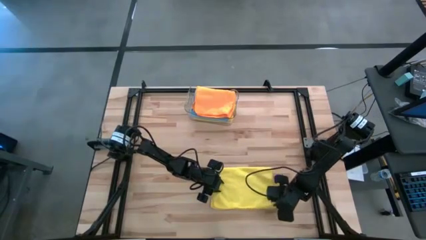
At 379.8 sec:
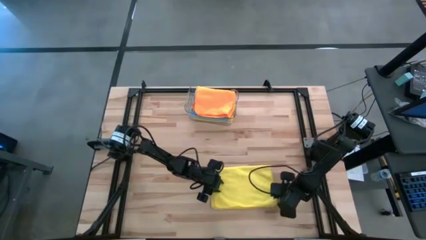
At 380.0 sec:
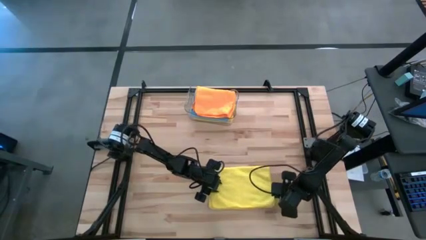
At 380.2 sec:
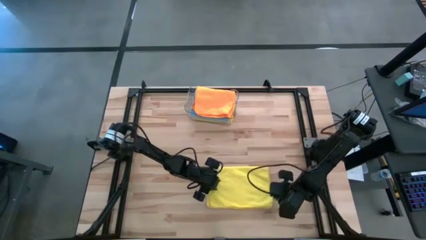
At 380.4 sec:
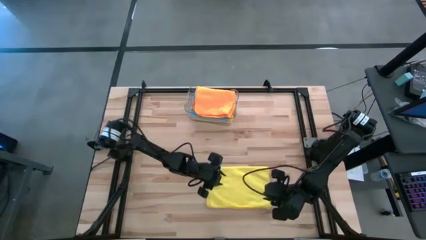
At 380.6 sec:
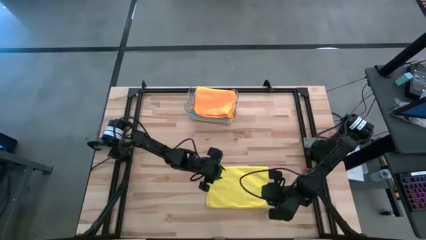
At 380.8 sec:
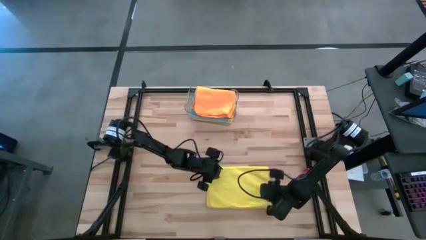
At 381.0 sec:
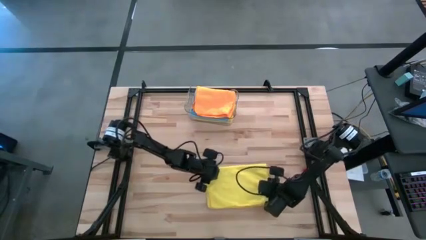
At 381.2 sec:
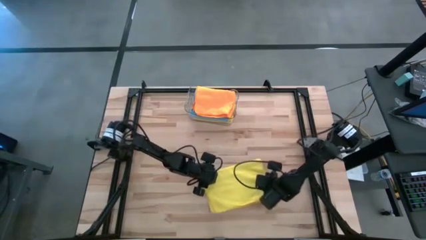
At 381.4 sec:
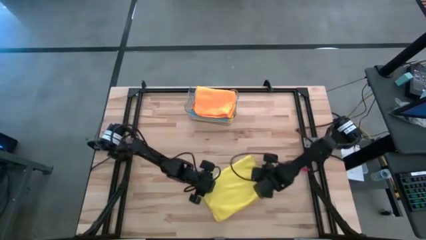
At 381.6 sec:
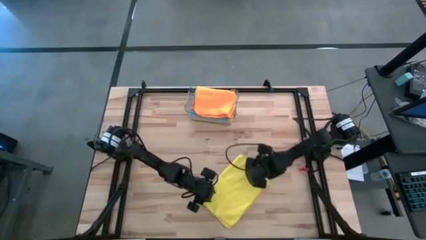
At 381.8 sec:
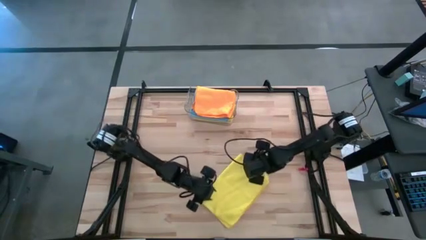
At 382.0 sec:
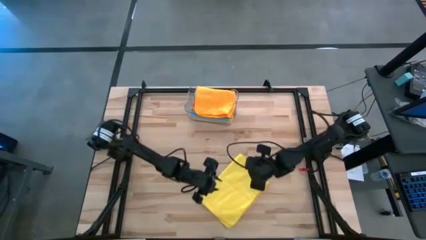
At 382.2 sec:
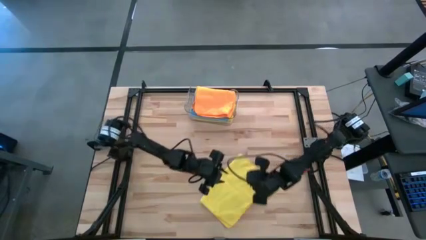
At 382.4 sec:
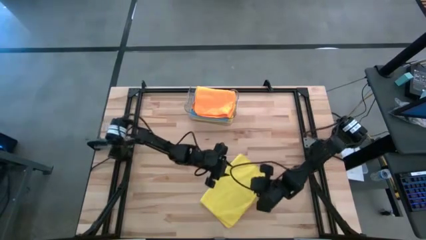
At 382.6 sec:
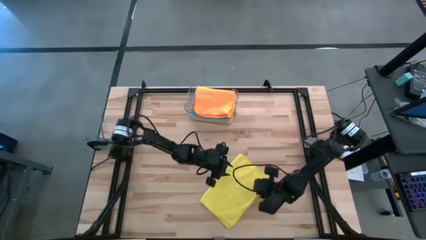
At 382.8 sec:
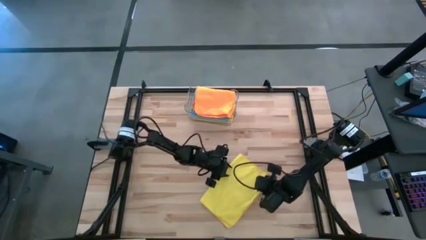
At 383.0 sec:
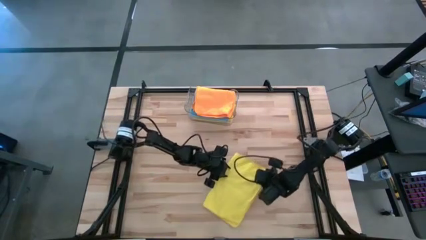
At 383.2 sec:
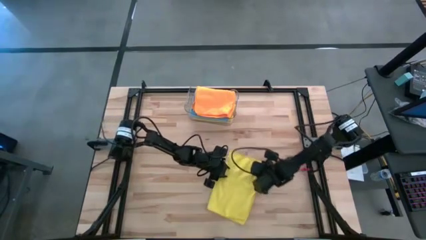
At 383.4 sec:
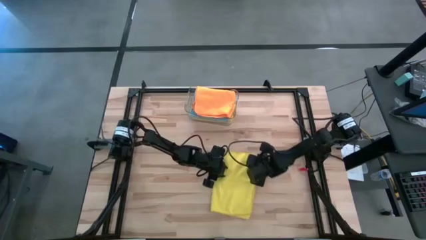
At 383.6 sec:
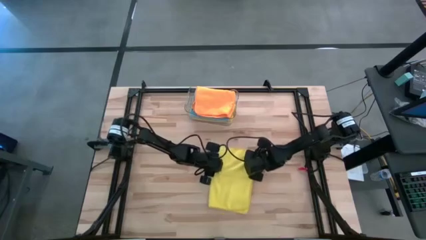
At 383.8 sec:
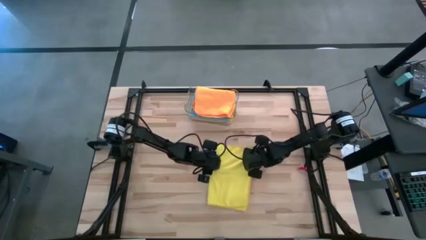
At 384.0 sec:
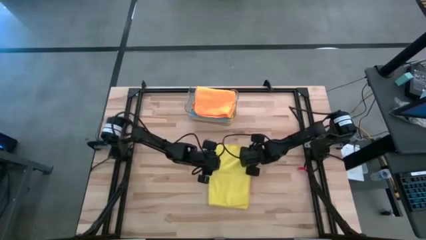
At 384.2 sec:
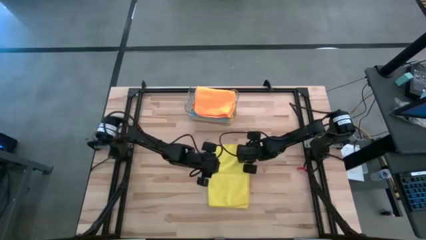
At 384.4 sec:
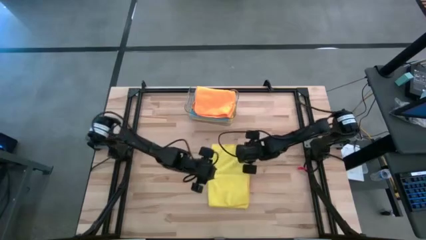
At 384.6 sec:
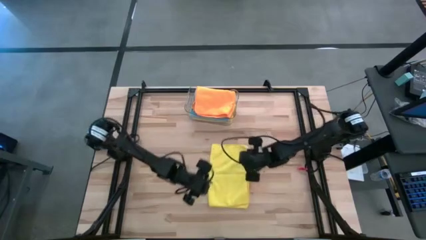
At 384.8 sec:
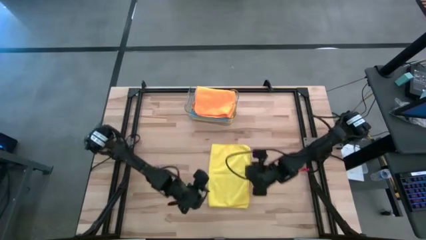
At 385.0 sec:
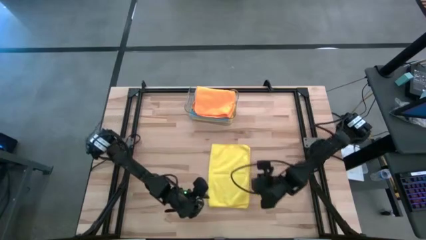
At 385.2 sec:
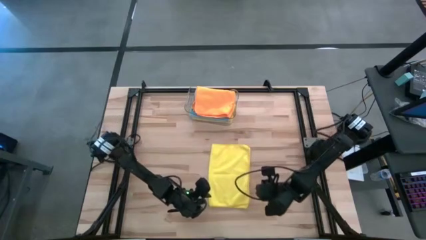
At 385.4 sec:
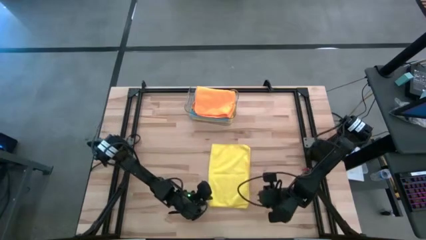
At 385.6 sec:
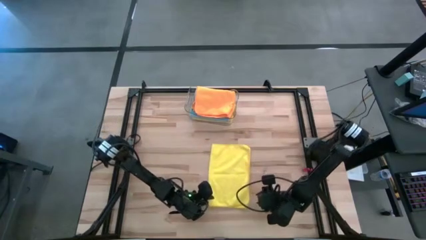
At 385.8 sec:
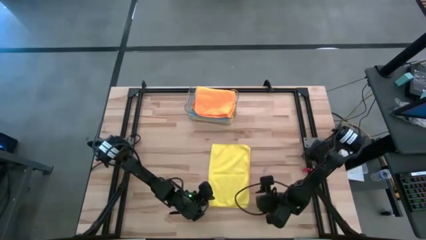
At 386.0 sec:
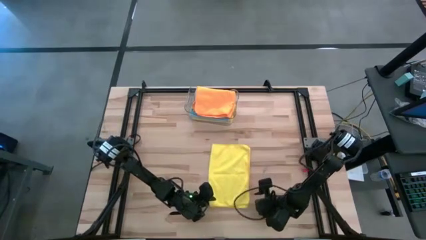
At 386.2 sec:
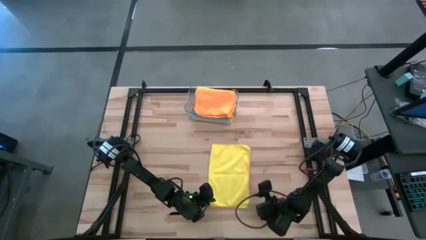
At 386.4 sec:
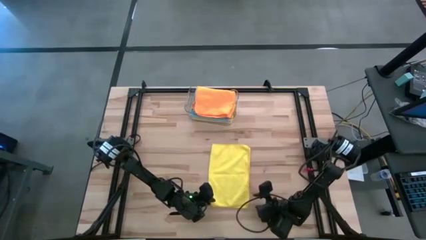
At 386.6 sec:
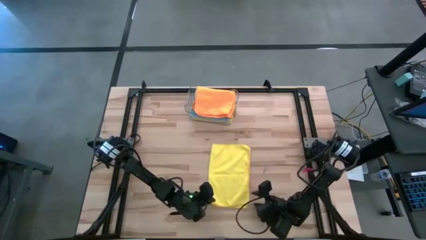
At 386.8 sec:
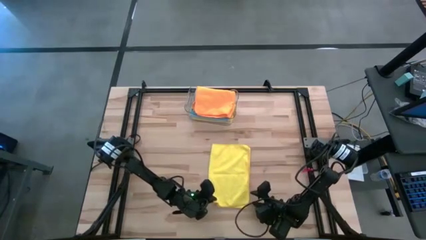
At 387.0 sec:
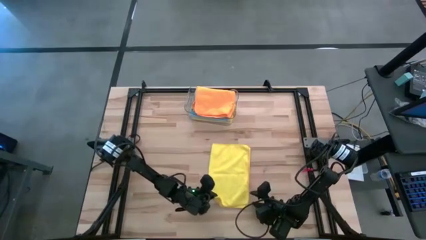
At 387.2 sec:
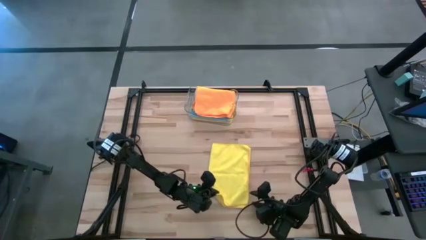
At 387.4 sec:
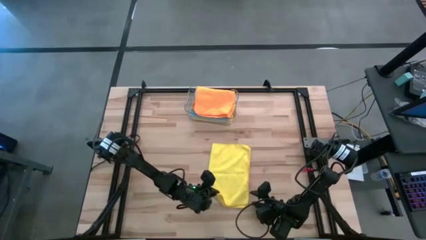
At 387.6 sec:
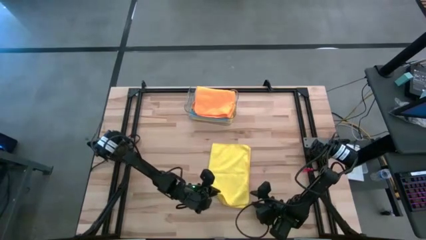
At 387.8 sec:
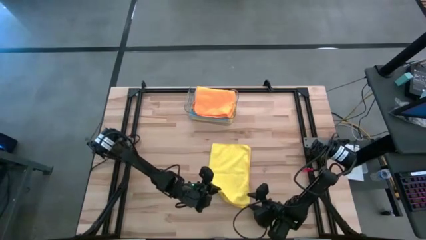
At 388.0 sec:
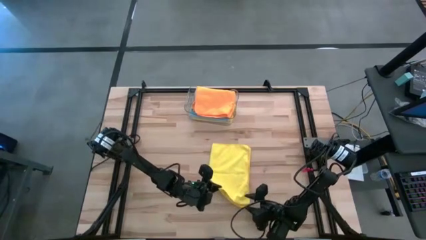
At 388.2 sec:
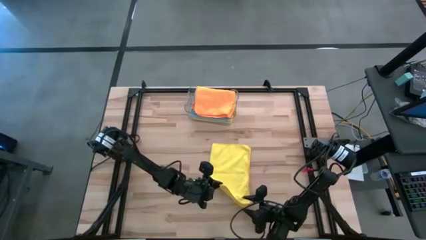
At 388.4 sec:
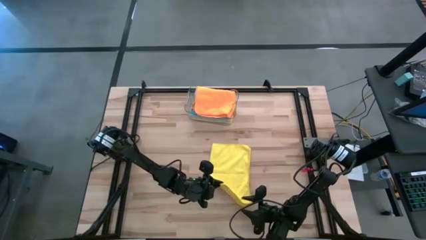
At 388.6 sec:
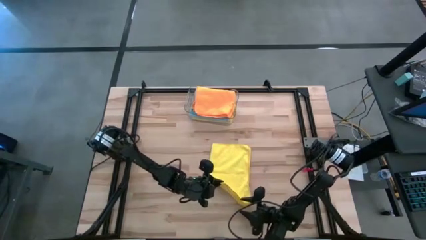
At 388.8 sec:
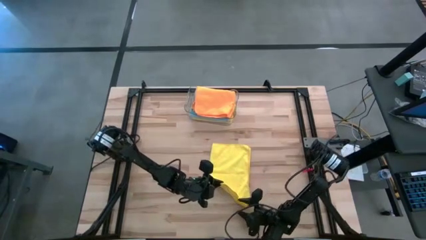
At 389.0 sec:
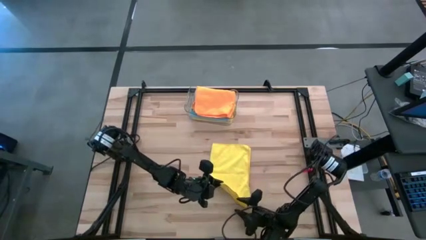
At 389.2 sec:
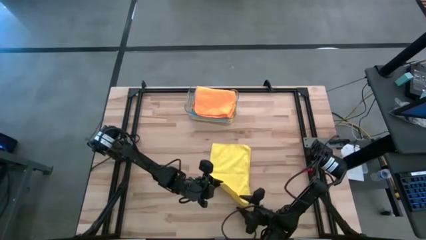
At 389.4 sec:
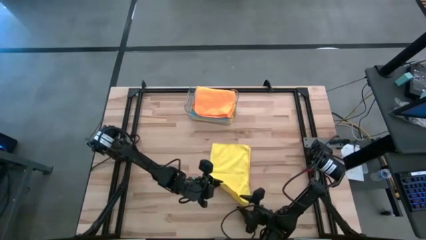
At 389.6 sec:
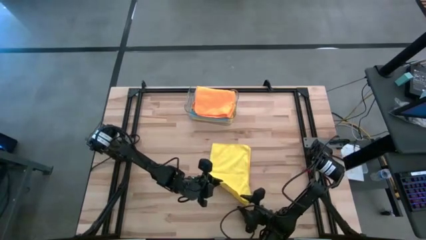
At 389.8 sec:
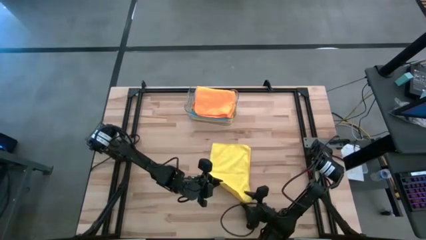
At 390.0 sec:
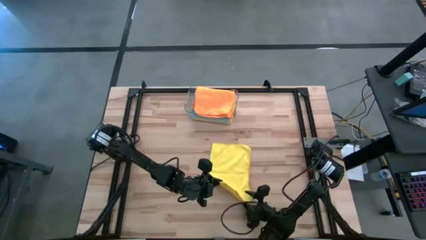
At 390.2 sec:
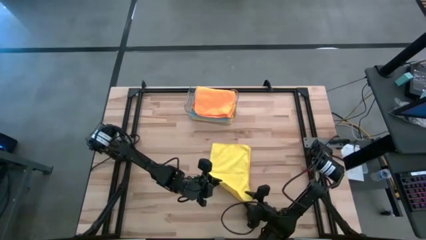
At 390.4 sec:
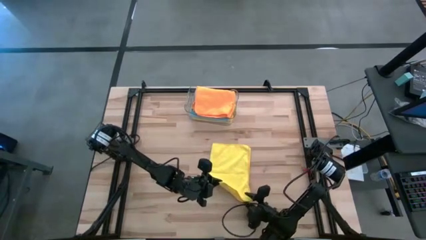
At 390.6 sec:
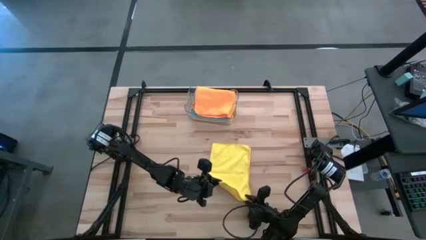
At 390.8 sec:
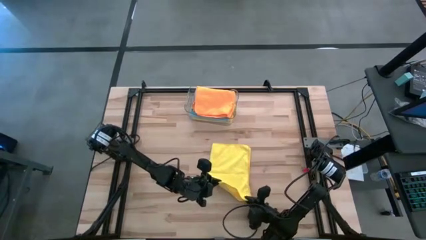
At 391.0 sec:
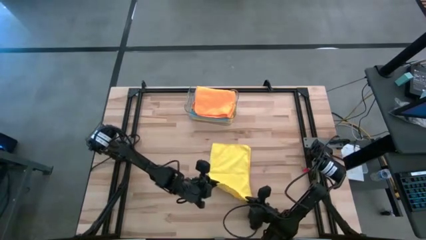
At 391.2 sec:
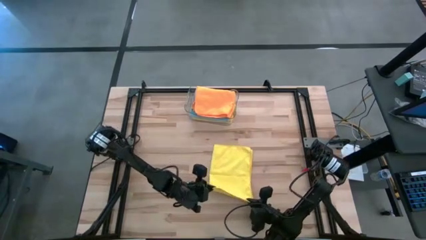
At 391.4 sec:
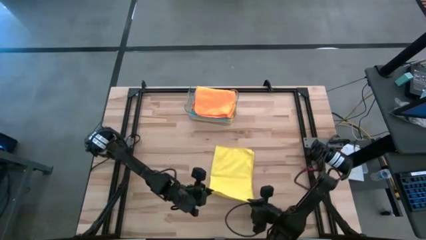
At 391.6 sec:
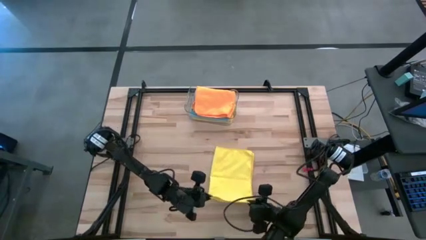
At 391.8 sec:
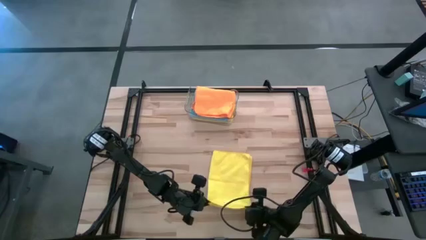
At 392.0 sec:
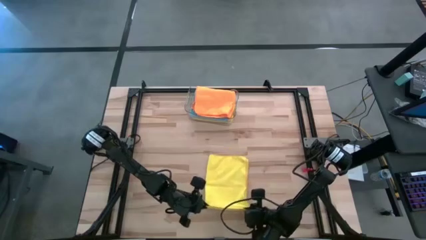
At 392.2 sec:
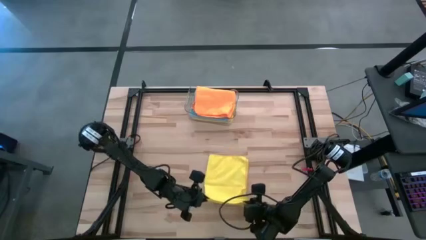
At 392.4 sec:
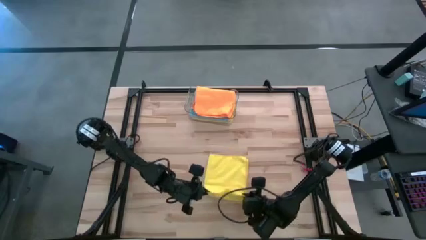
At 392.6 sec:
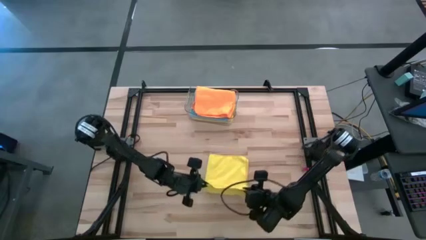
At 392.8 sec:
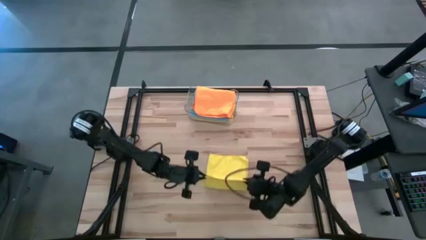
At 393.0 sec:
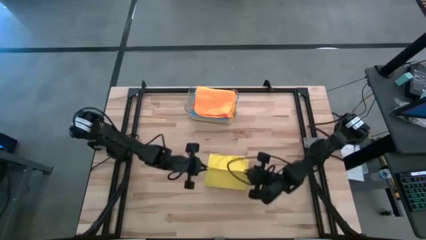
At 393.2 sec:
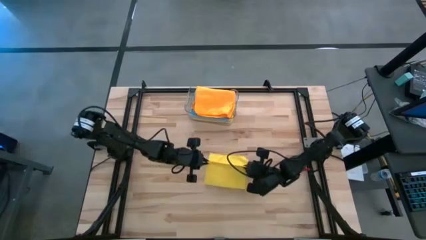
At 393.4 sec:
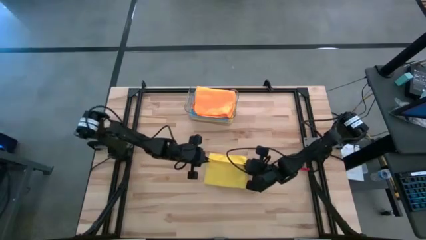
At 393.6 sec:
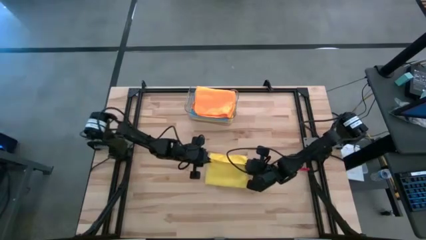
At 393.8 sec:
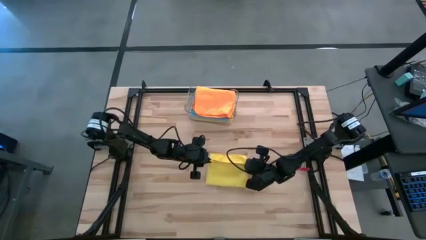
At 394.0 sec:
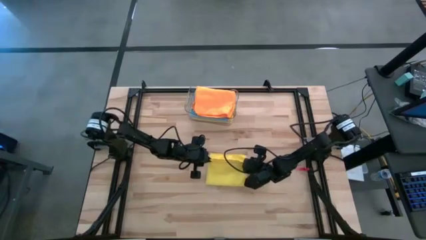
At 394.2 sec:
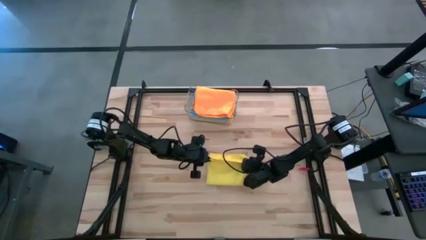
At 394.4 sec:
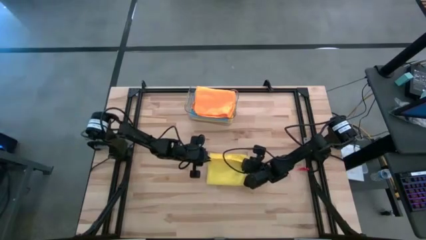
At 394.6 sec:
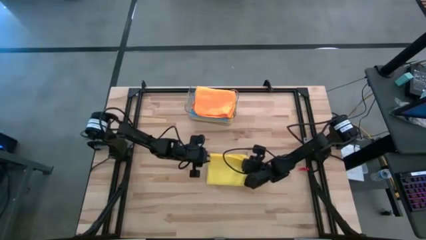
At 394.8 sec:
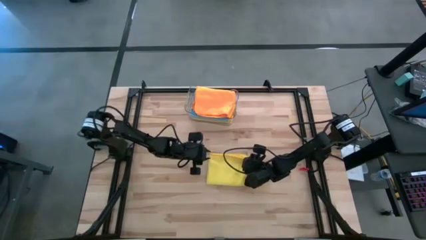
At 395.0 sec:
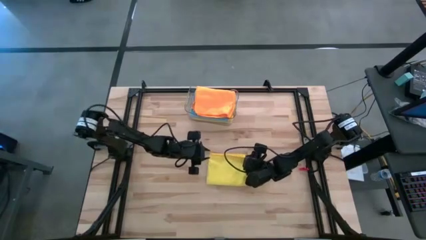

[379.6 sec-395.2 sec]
Task: Fold microfiber towels
Fold the yellow microfiber cloth
